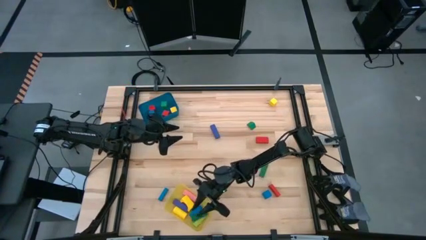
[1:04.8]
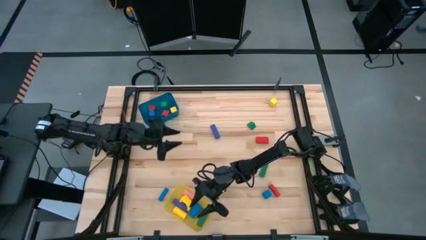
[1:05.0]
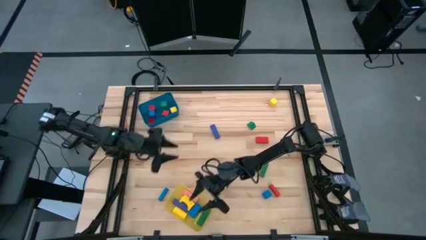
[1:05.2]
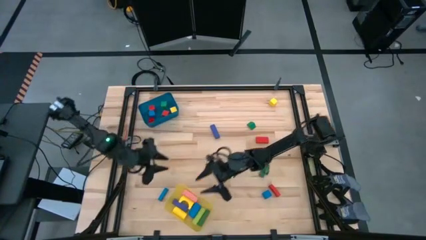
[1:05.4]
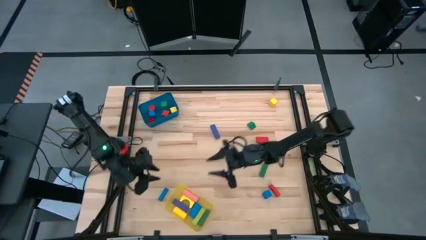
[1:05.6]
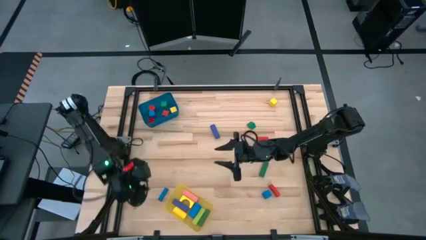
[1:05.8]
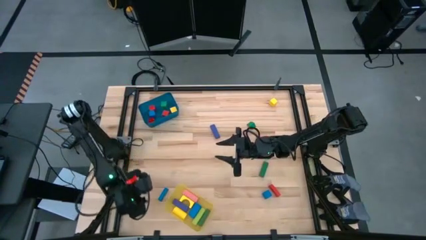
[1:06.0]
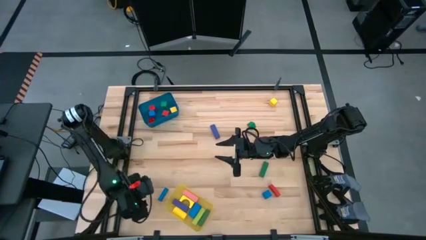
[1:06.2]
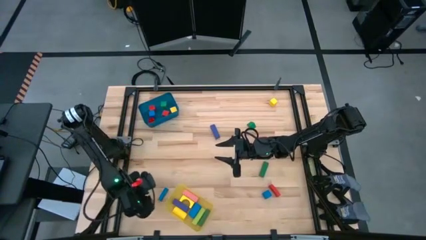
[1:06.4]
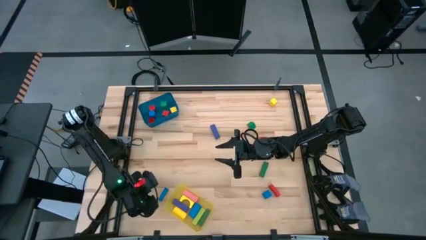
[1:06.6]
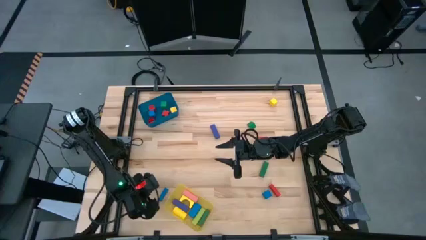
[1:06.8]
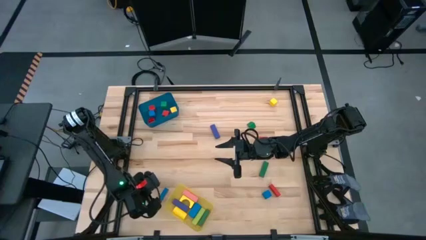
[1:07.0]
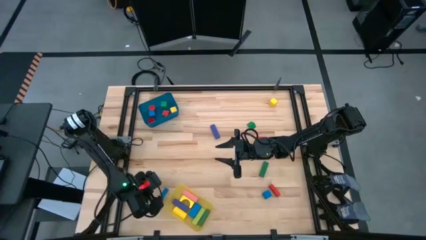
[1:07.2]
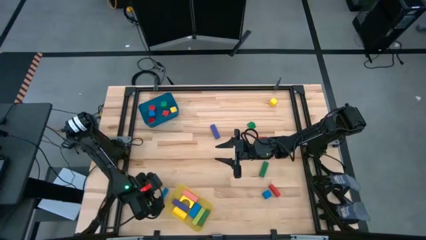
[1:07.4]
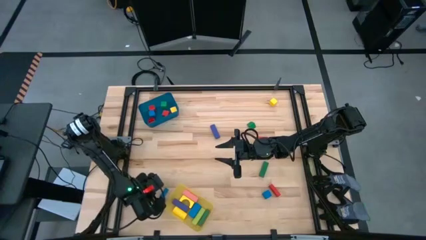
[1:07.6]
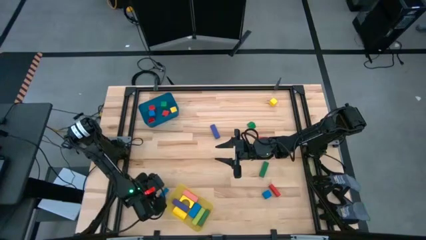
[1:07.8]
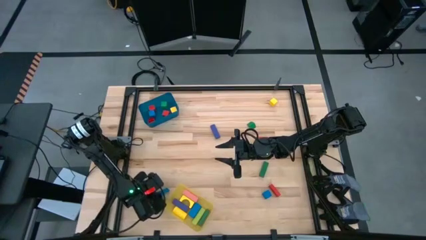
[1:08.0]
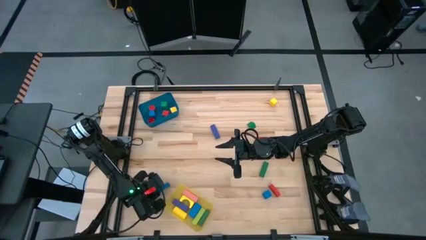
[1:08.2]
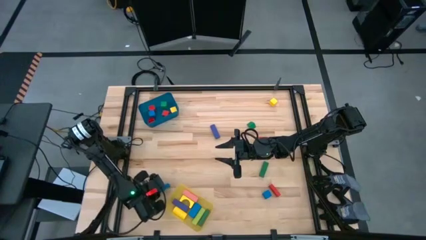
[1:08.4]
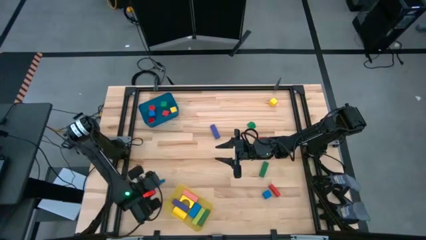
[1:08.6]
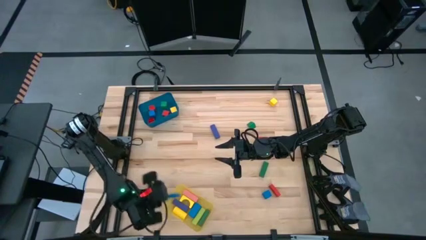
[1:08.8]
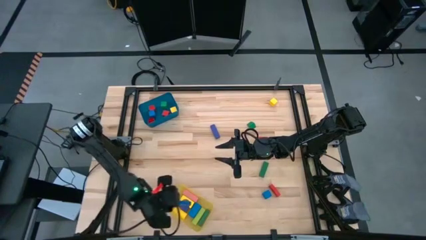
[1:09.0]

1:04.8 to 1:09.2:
Task: Sort blocks by size
Put the large blue block into the yellow bin

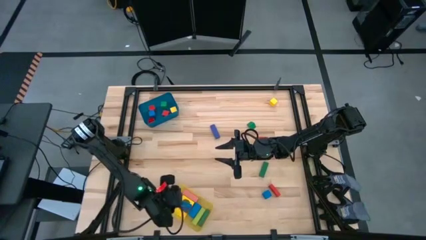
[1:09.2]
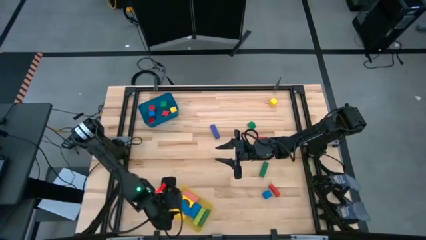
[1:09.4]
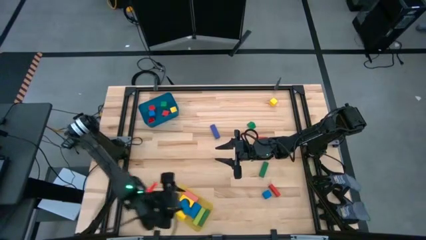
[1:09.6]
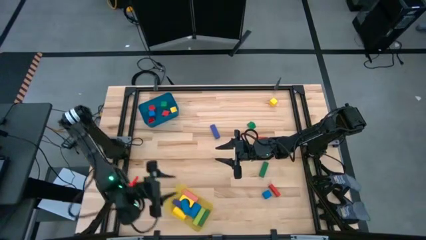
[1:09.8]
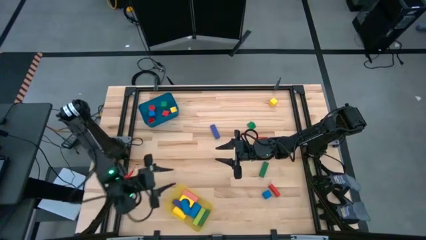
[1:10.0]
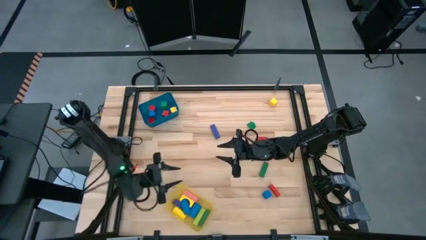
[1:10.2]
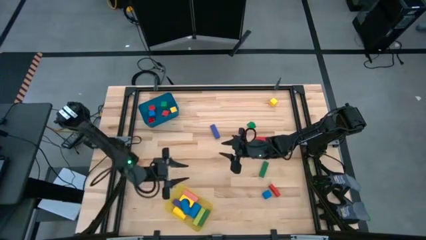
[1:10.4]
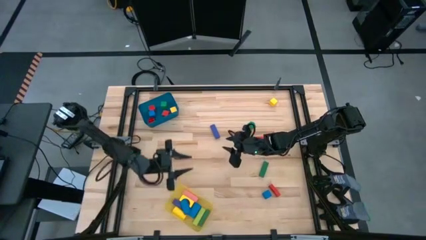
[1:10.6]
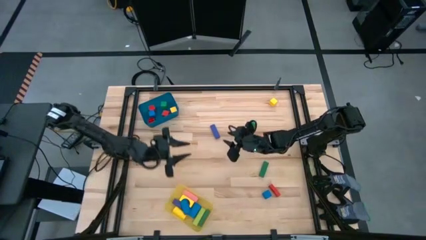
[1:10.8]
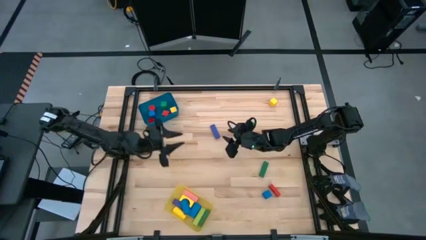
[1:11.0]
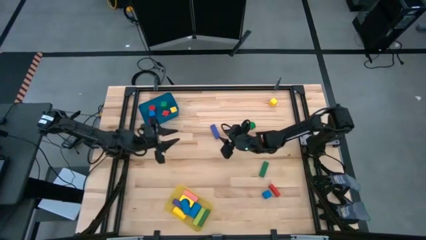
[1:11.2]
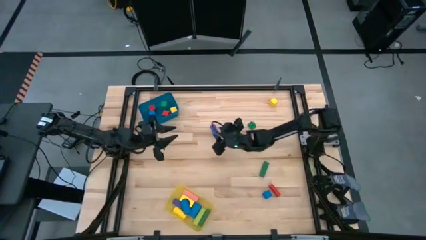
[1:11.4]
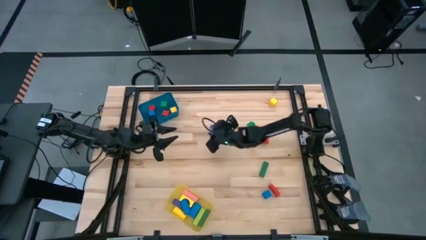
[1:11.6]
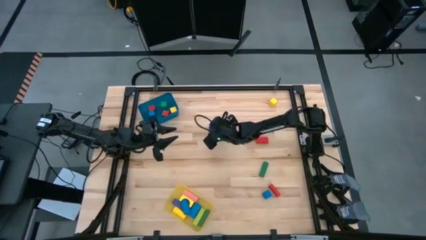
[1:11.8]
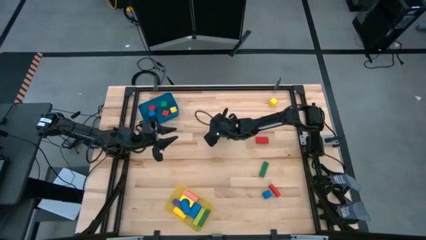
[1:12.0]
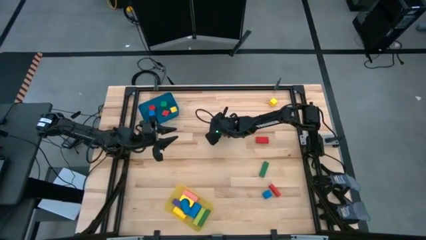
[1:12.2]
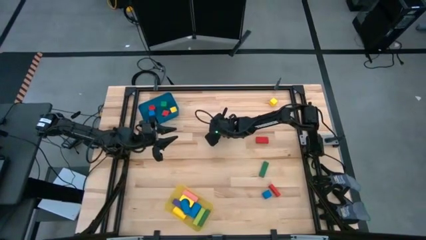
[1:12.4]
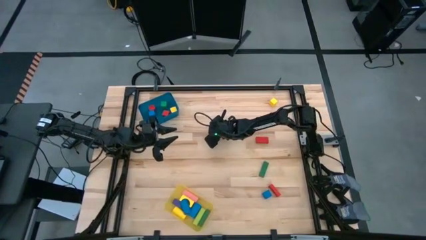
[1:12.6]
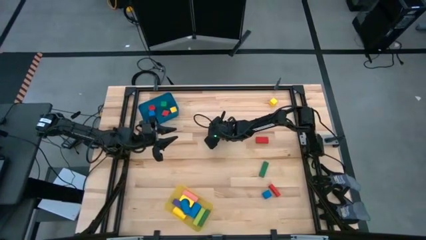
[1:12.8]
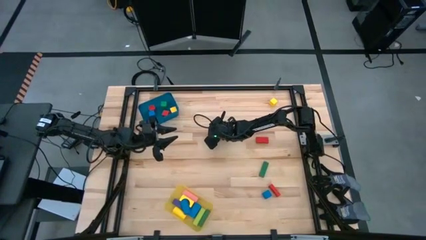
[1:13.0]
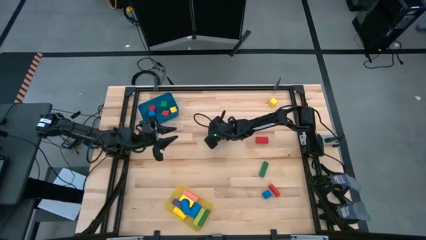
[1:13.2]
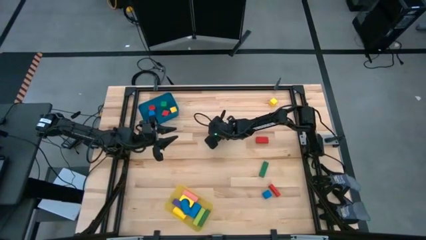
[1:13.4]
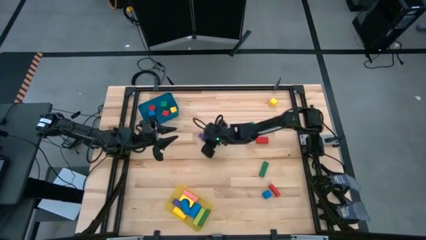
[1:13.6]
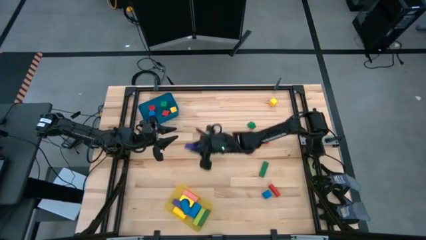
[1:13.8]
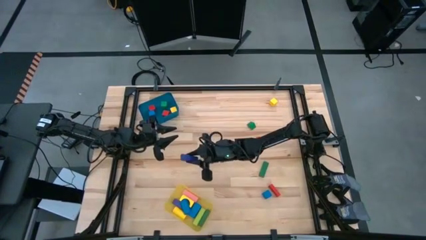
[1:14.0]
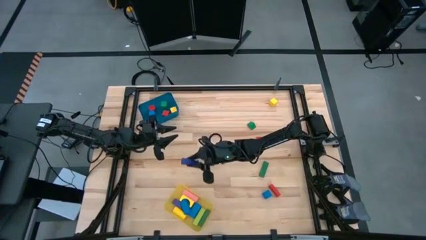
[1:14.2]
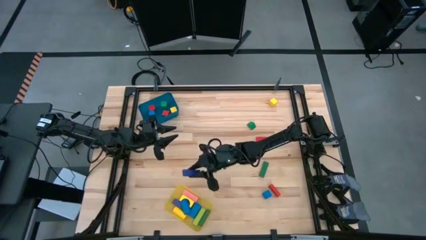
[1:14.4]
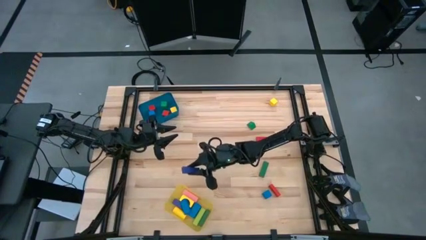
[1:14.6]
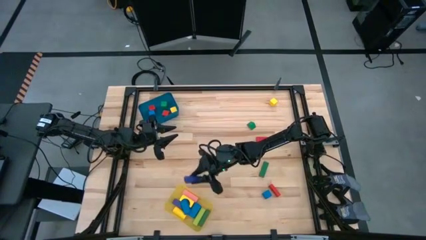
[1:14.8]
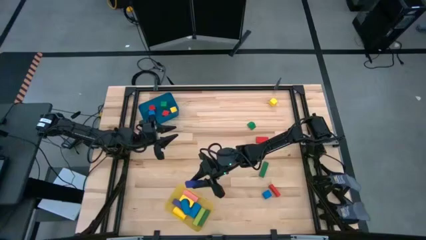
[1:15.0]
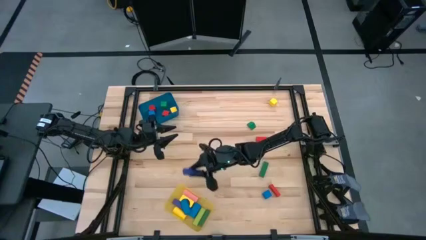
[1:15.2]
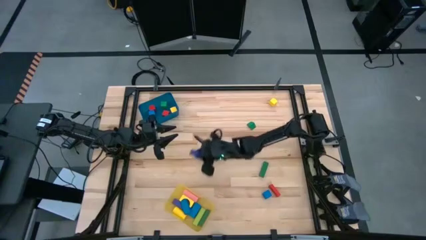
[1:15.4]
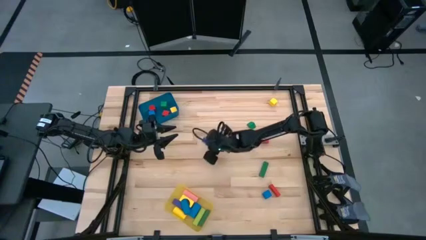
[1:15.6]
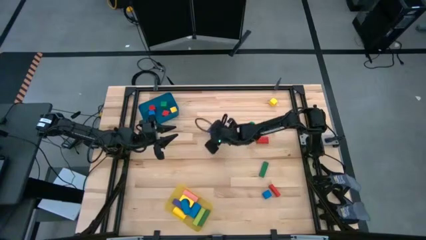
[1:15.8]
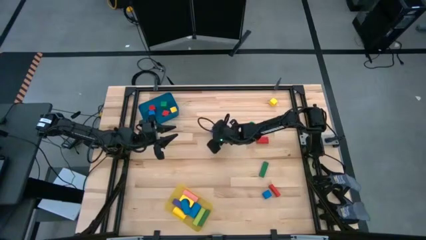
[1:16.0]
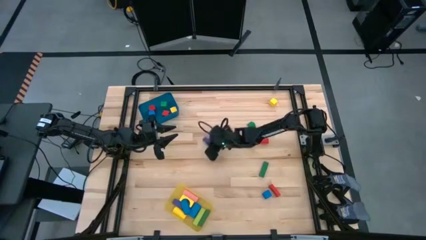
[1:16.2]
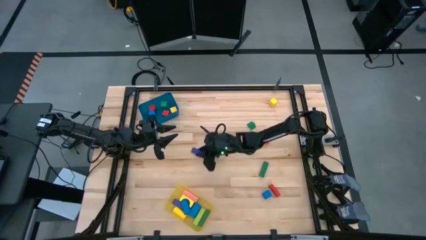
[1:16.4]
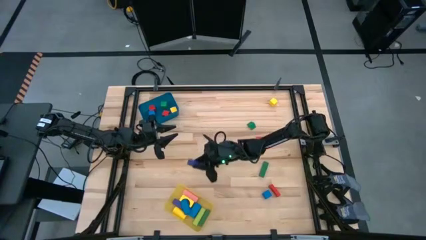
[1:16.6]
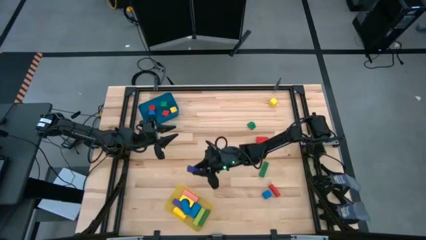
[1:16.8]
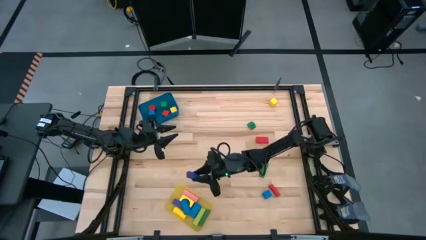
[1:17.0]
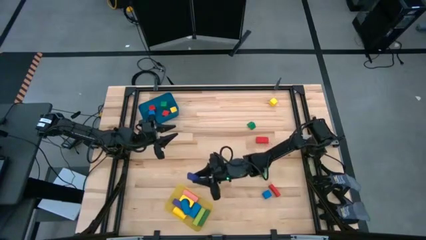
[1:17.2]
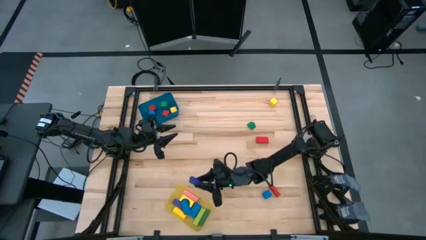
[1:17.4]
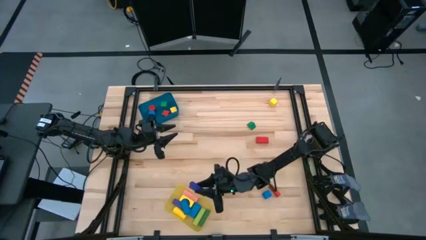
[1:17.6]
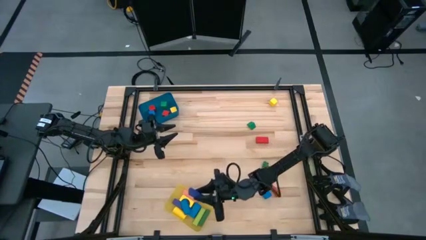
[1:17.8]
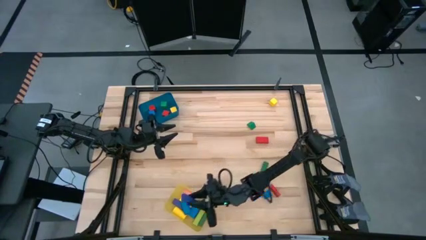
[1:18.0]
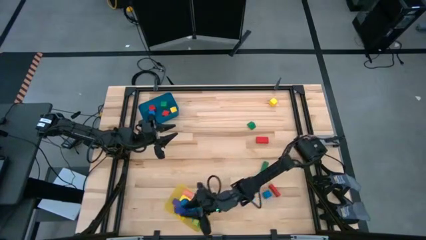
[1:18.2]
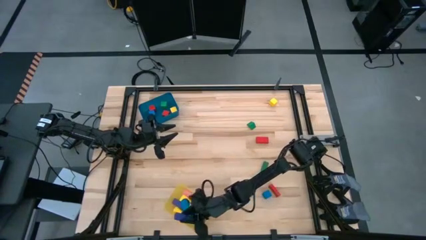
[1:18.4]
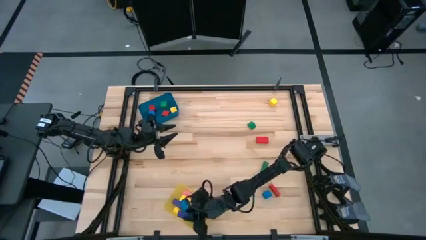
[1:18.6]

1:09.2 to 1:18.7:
Put the large violet block into the yellow bin

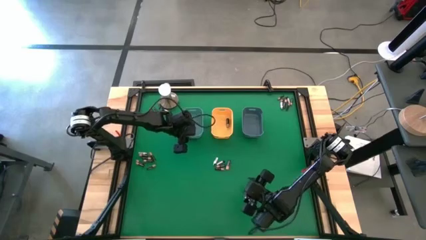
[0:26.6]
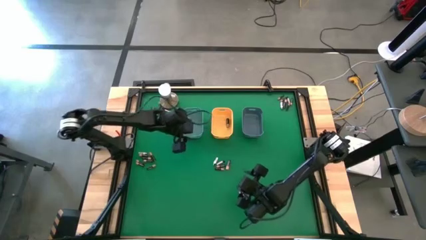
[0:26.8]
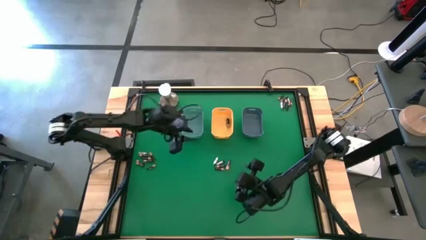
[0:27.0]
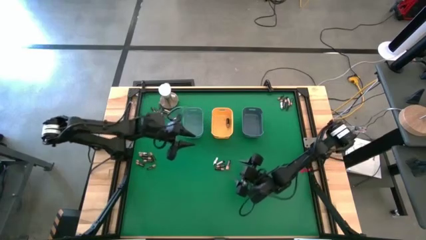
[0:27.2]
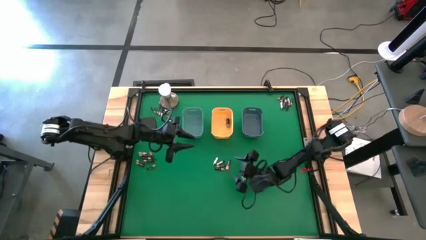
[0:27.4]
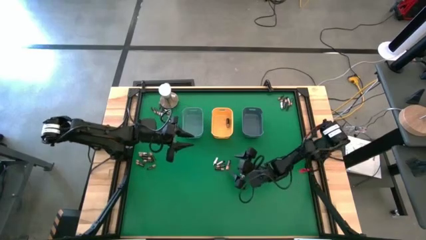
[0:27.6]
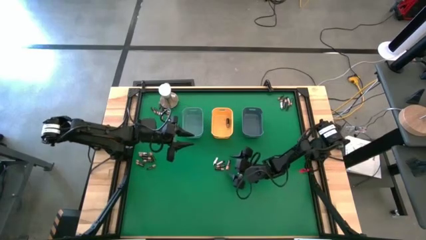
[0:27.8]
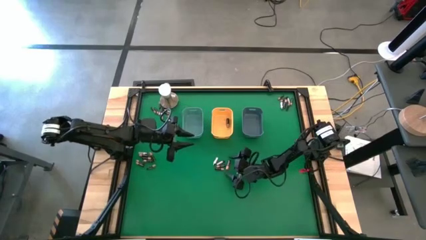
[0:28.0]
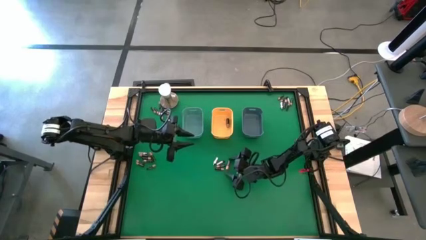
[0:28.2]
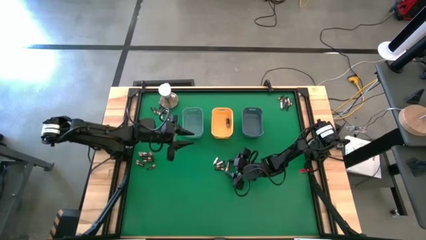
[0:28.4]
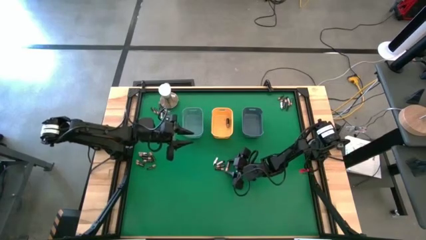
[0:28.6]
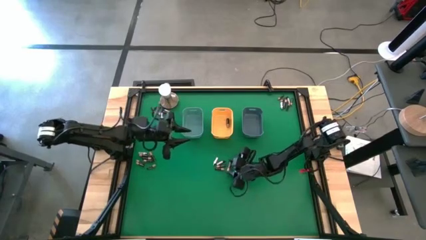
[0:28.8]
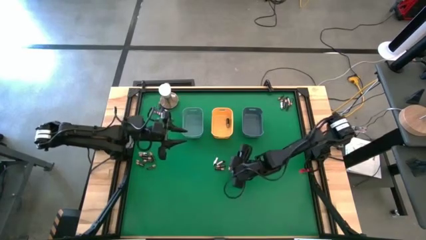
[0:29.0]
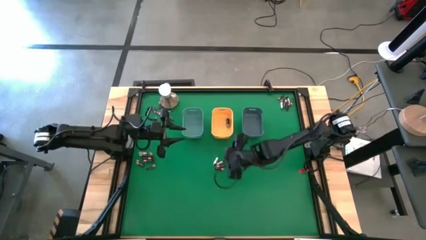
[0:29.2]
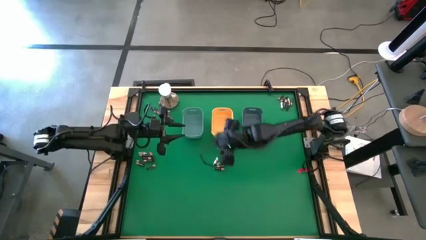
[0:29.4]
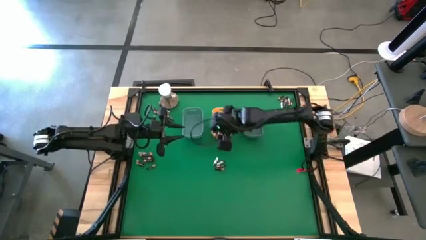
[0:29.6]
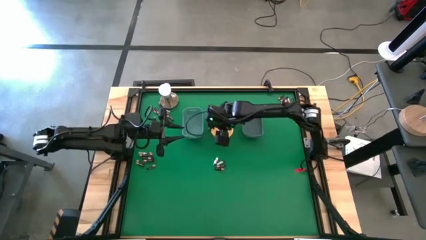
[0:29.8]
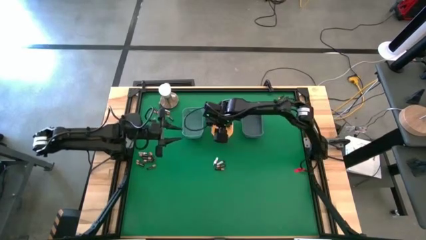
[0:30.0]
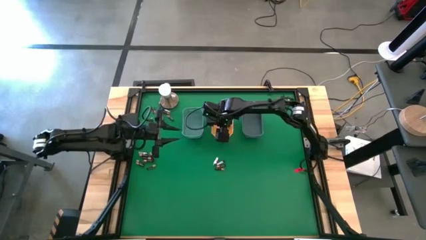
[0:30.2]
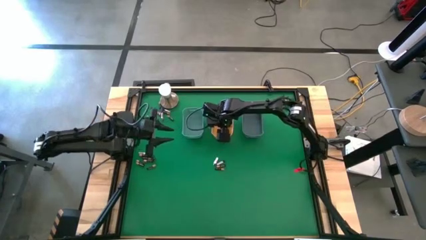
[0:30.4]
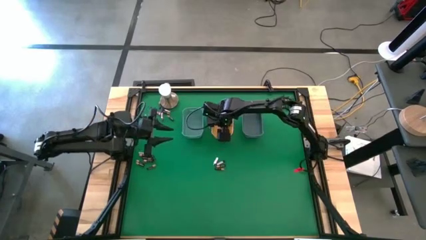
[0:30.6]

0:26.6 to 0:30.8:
Task: Sort batteries
Put the large black battery into the yellow bin
